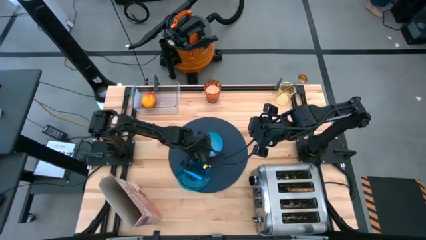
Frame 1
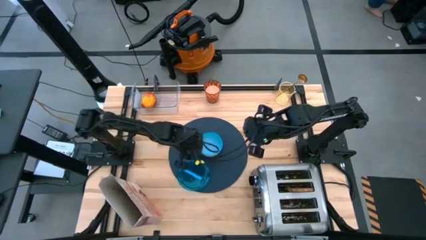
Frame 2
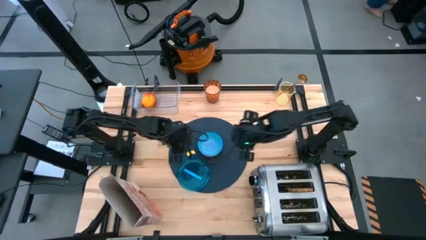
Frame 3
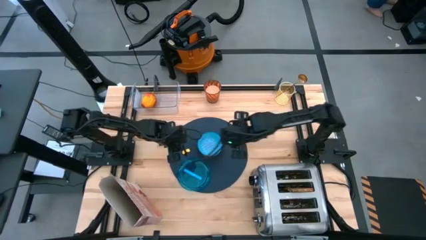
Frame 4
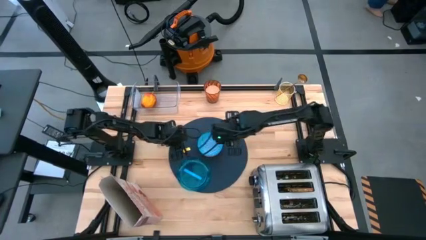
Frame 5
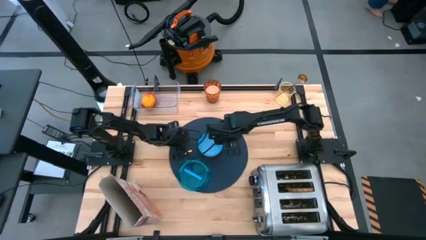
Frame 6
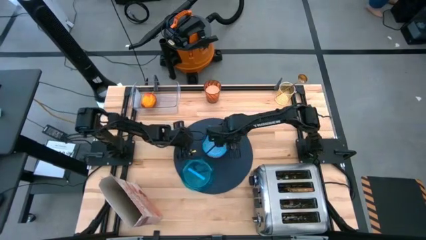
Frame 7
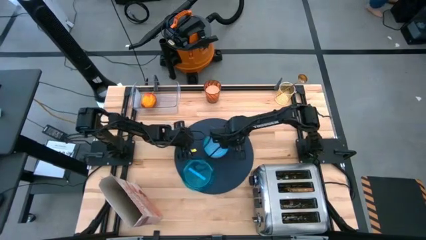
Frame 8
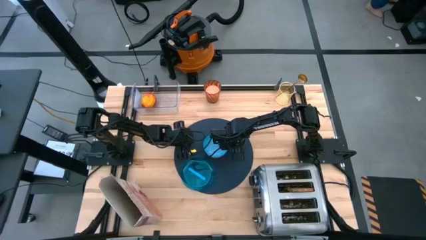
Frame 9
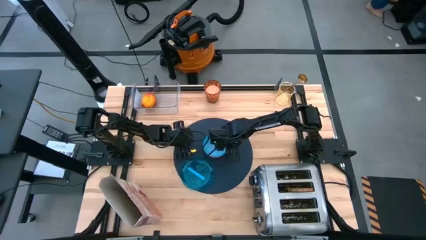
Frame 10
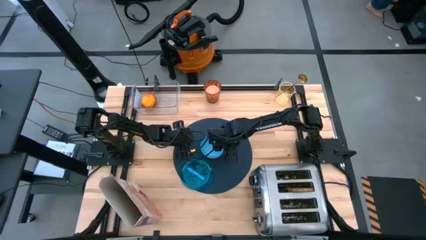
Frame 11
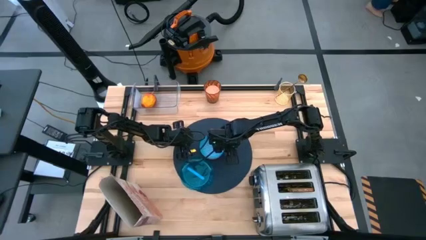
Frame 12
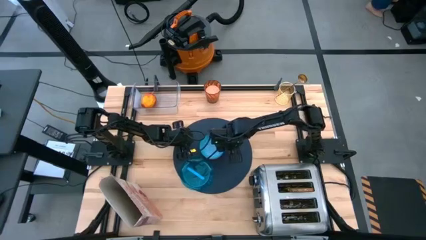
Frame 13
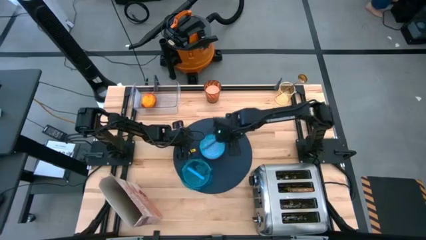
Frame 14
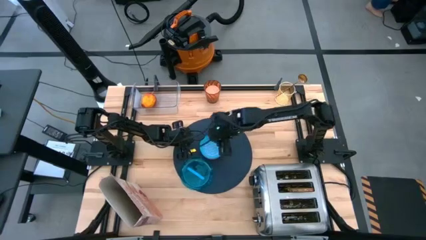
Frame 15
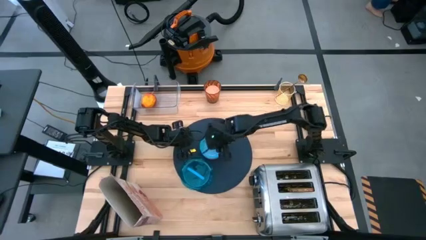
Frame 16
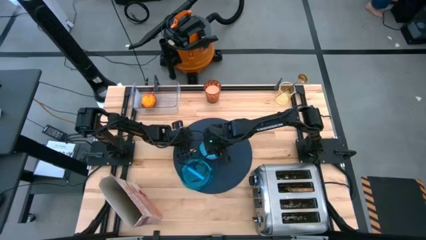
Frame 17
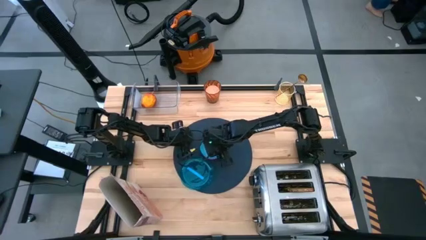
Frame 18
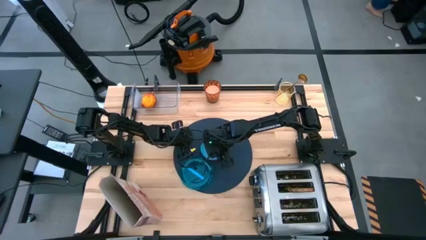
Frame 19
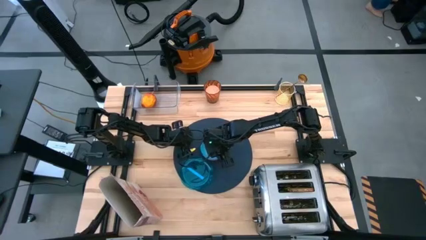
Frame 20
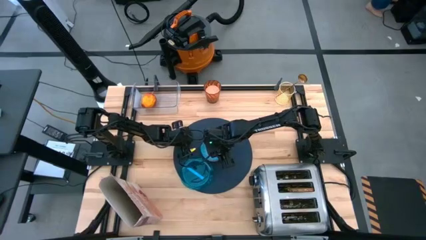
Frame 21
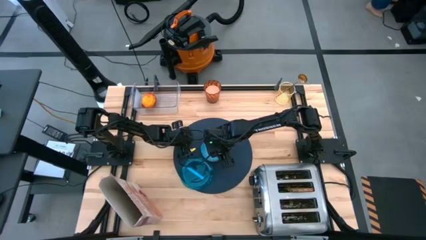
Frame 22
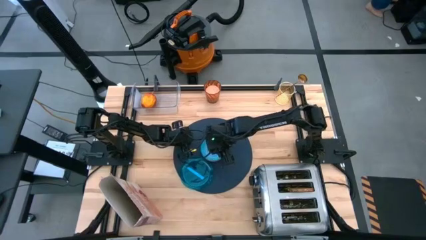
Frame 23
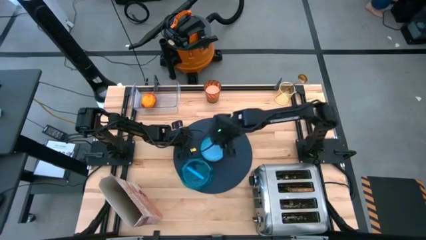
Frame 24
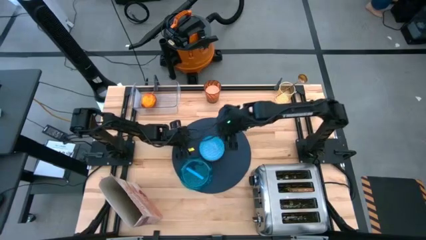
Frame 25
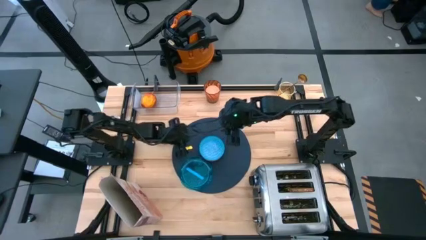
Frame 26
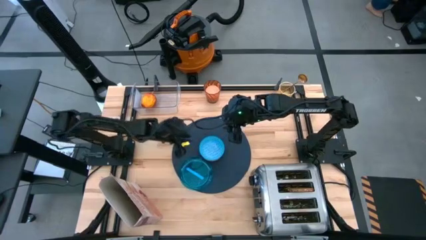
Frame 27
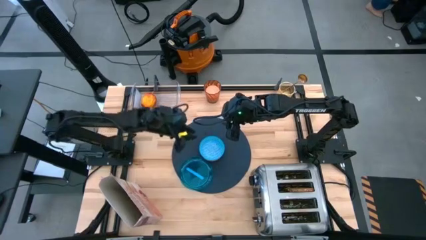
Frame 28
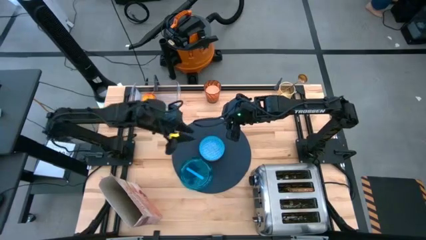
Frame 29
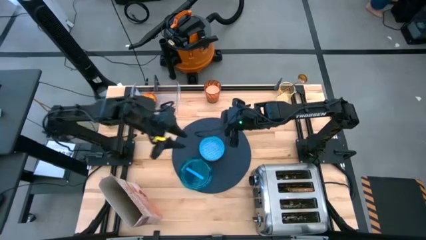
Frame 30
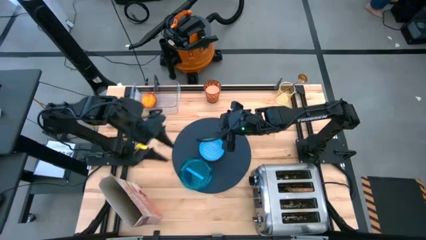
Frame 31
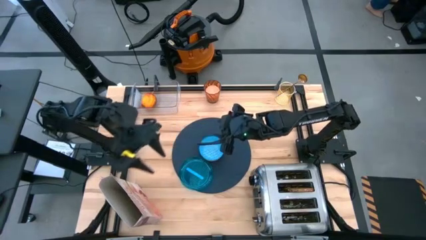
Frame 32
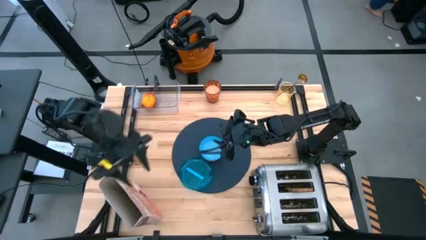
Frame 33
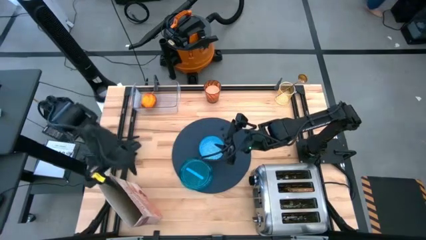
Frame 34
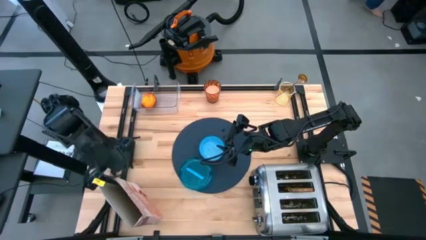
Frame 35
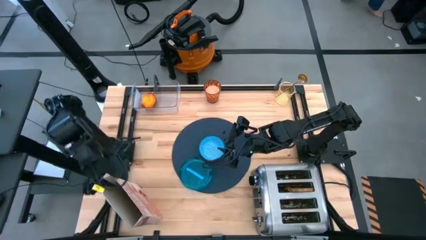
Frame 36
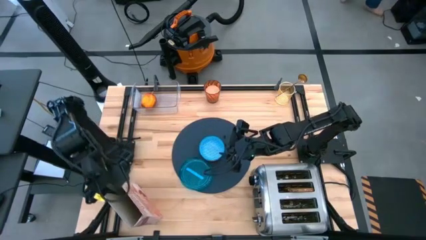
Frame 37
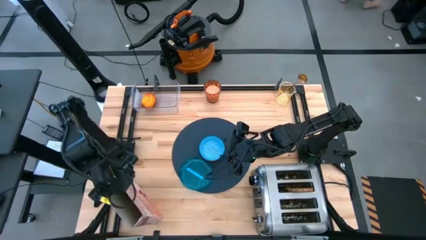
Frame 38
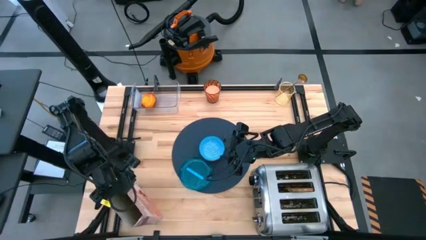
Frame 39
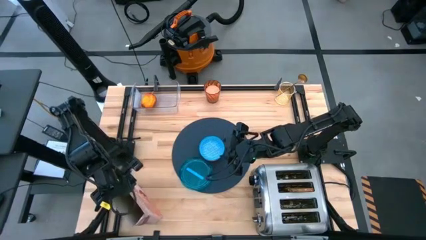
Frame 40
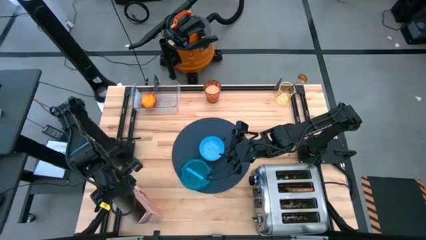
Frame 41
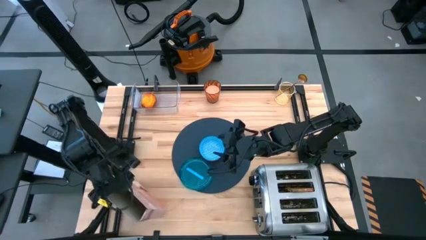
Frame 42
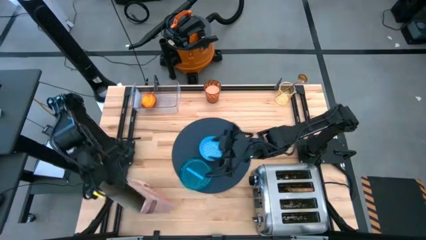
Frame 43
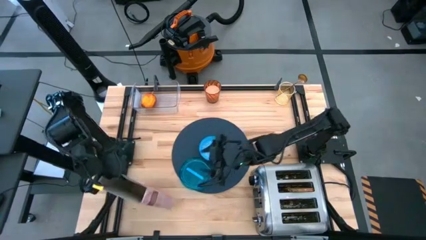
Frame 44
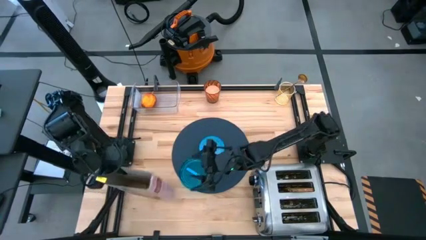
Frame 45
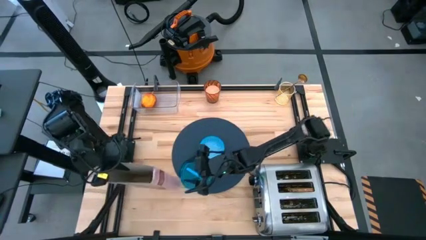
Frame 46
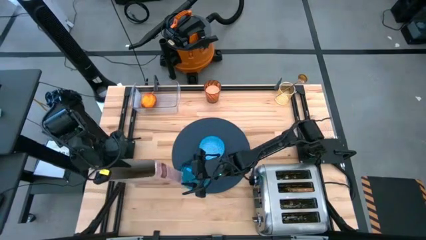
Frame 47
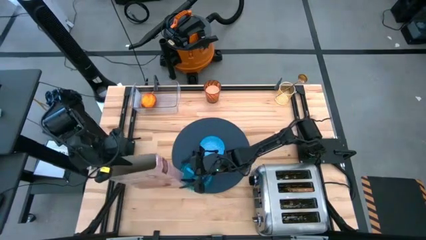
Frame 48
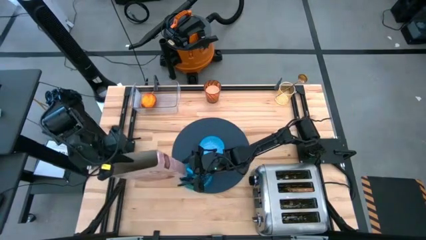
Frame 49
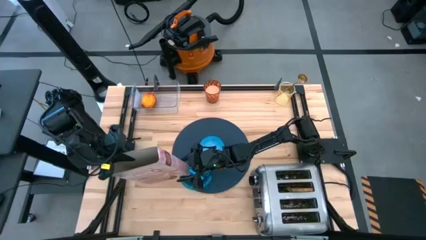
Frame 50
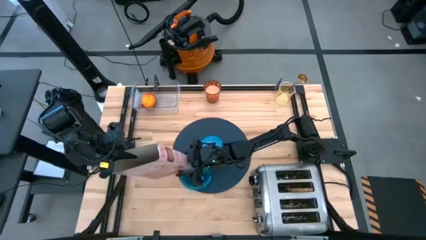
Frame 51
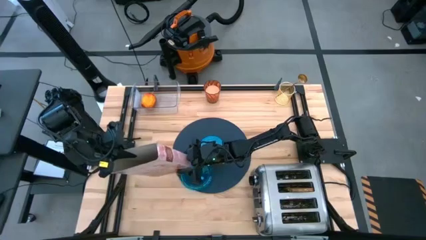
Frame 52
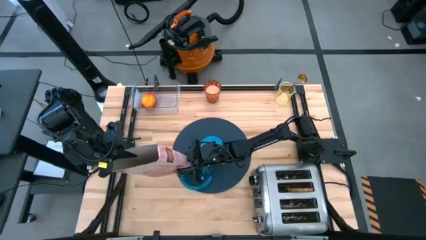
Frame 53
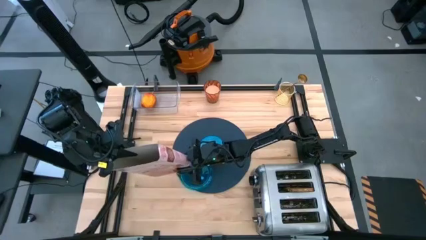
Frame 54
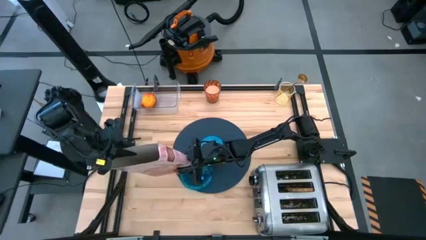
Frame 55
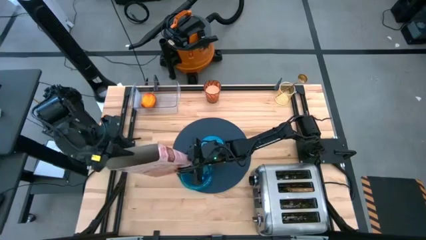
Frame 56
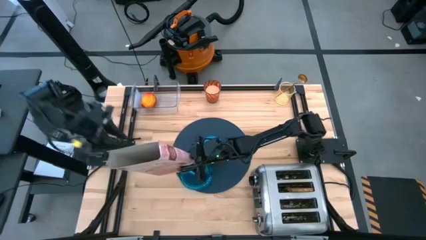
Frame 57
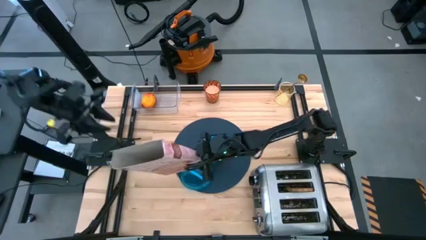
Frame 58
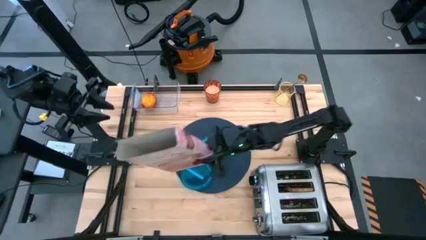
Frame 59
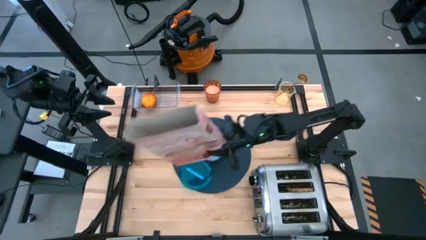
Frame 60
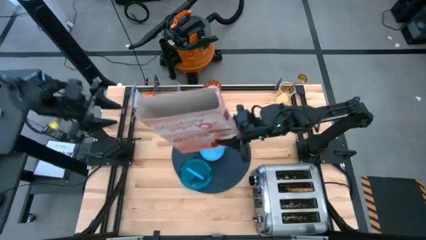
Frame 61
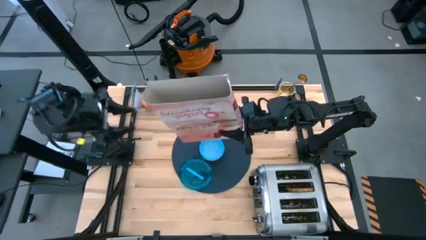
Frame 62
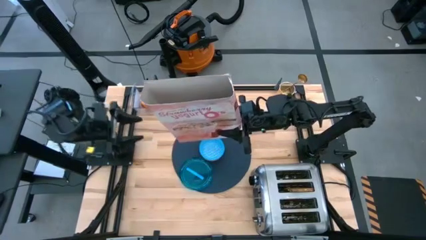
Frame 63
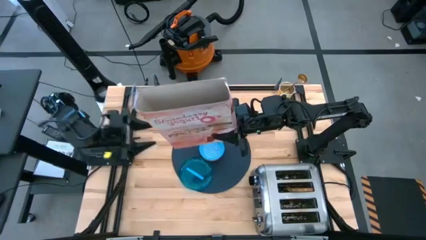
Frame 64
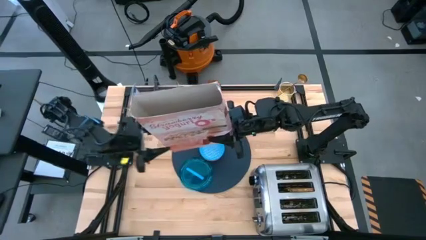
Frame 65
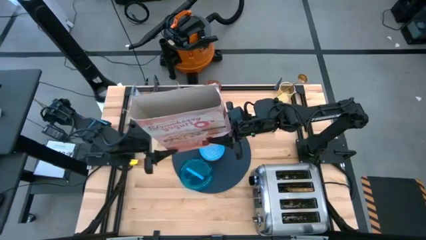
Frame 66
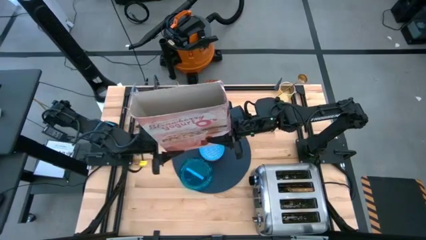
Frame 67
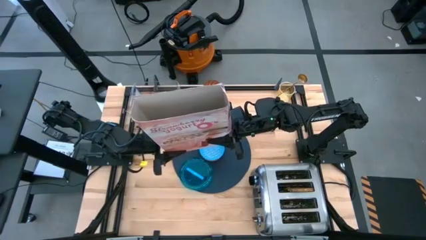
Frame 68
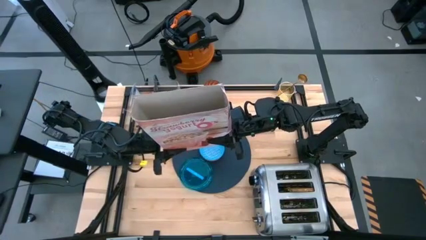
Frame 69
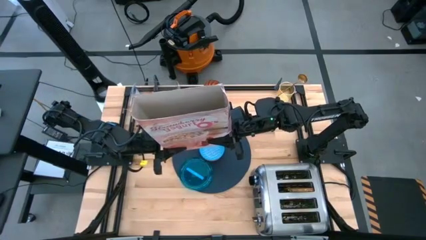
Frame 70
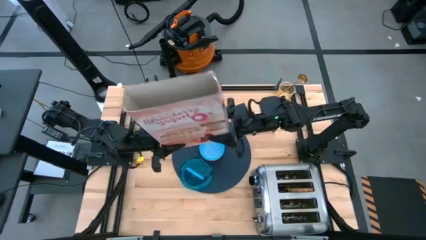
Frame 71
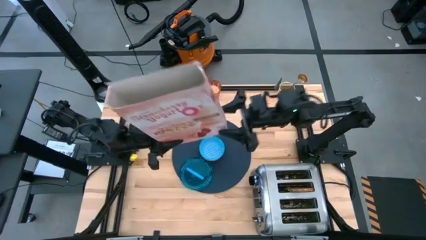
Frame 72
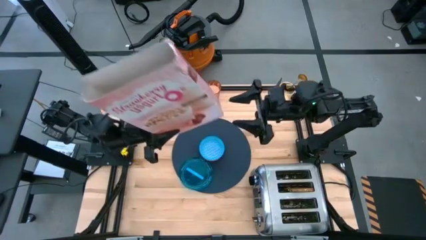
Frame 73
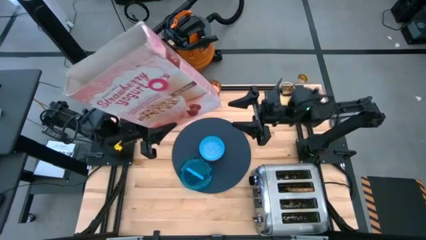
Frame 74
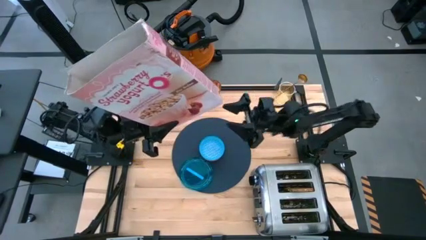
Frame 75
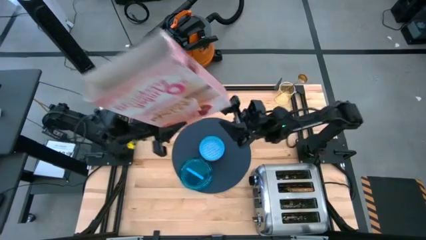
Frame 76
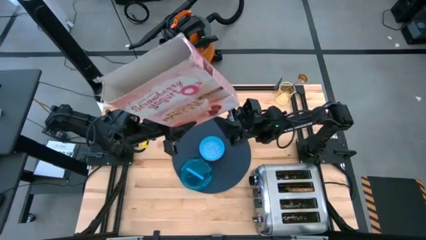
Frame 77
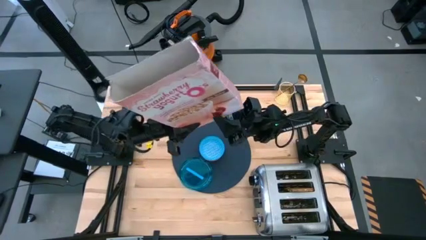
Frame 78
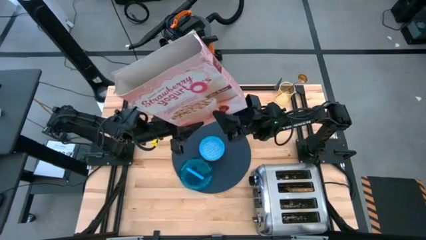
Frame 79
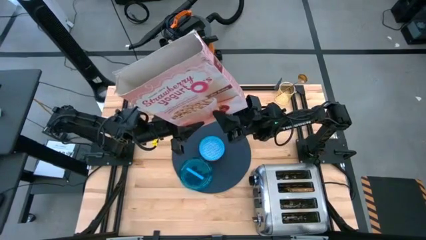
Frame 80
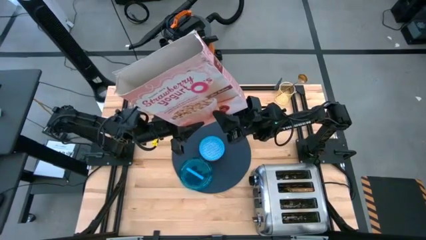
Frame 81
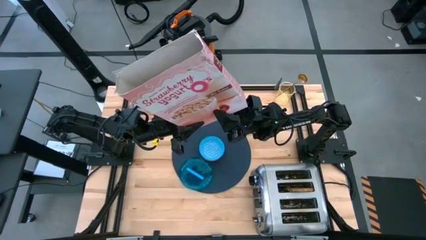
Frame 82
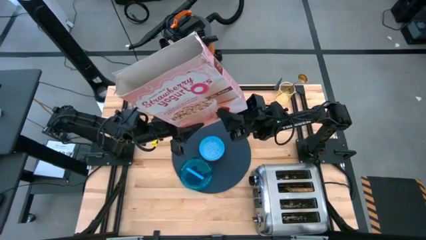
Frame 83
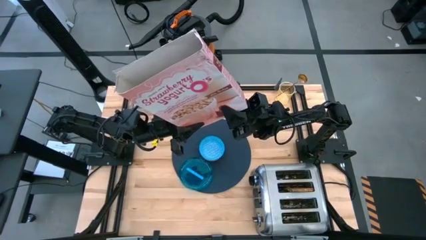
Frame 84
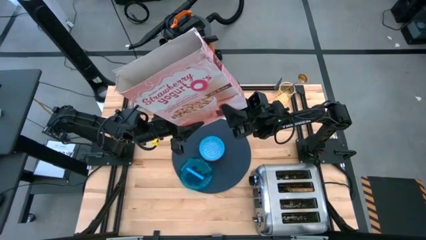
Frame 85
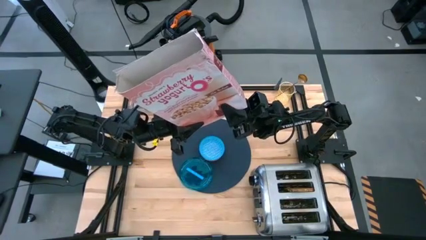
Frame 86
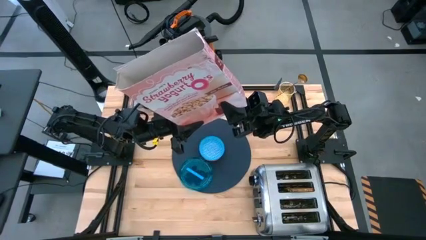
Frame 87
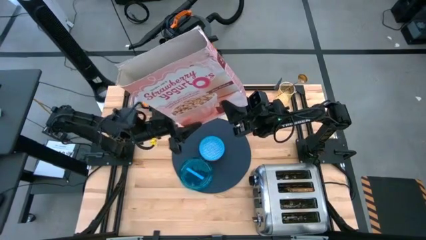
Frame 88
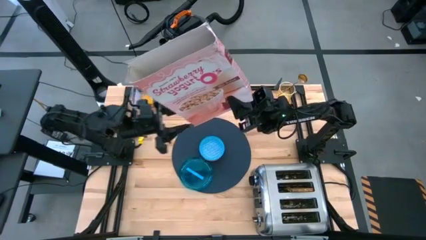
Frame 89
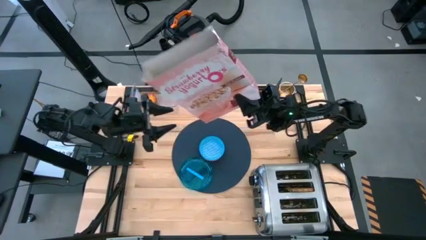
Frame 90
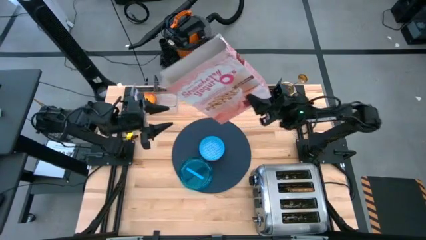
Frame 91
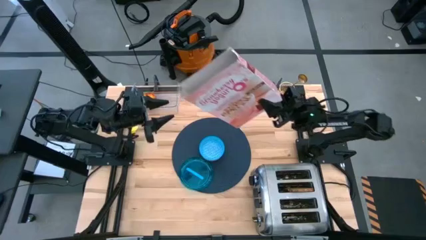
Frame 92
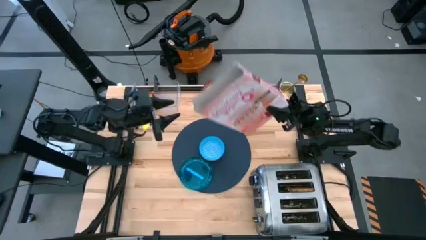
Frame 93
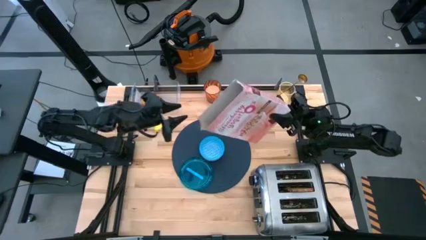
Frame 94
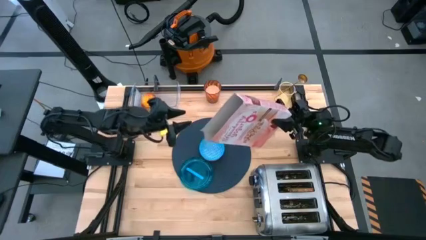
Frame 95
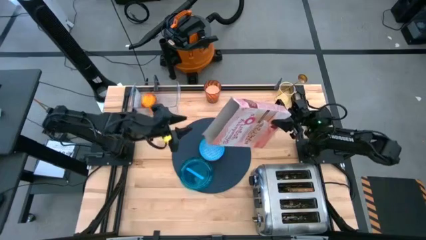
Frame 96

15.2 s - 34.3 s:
Task: Arrange a breakfast setting
Pour the cereal from the box into the bowl
